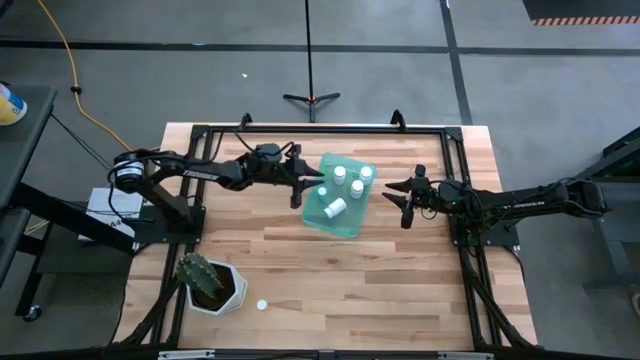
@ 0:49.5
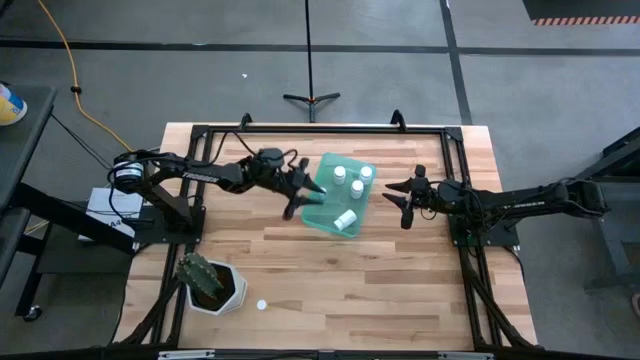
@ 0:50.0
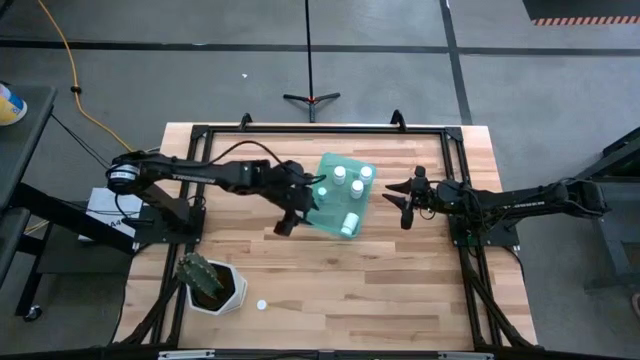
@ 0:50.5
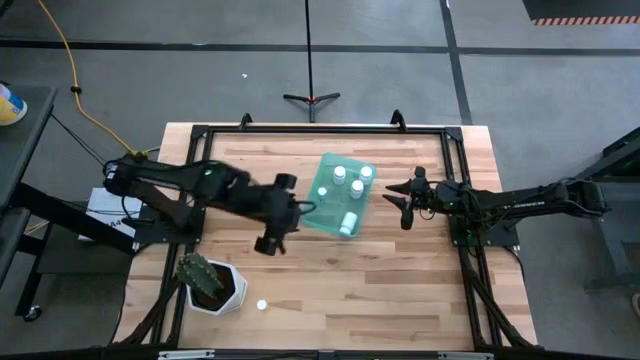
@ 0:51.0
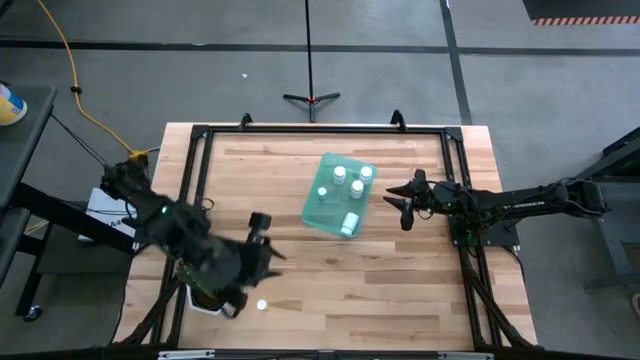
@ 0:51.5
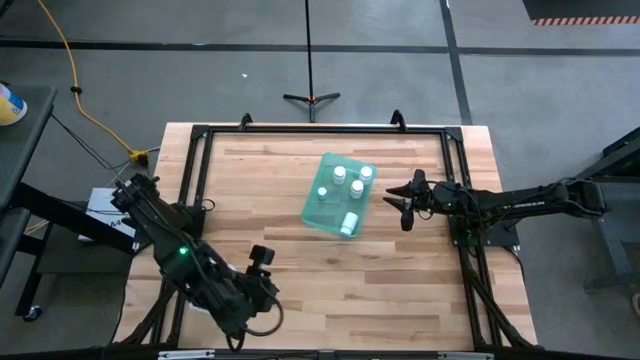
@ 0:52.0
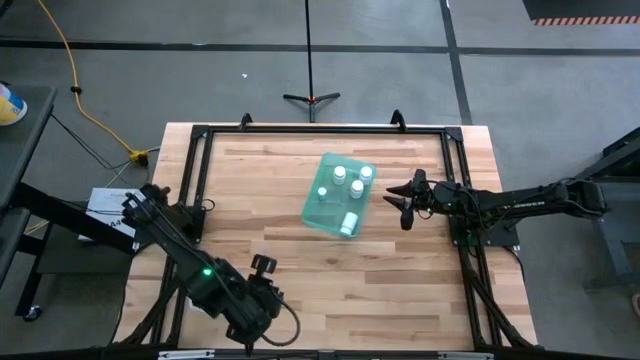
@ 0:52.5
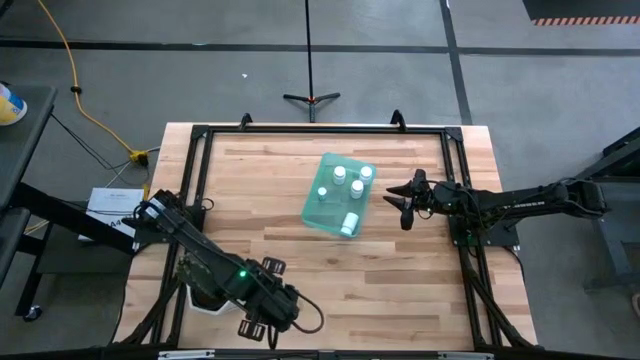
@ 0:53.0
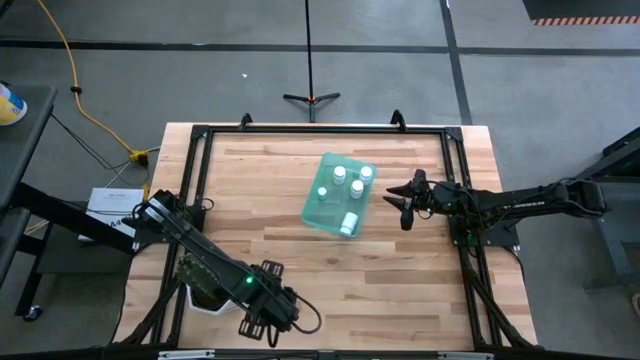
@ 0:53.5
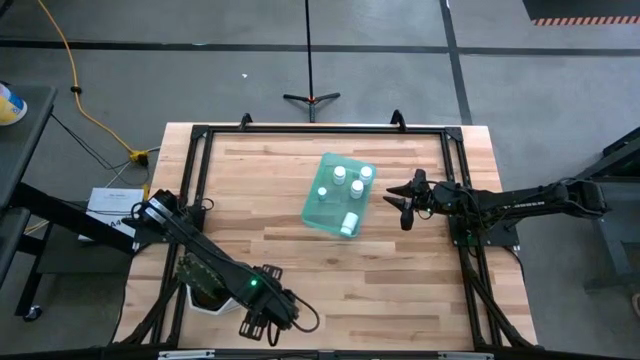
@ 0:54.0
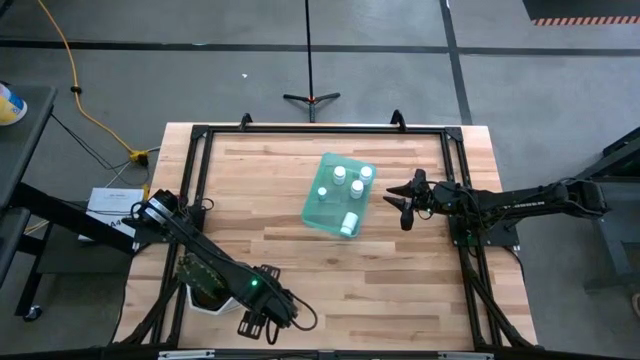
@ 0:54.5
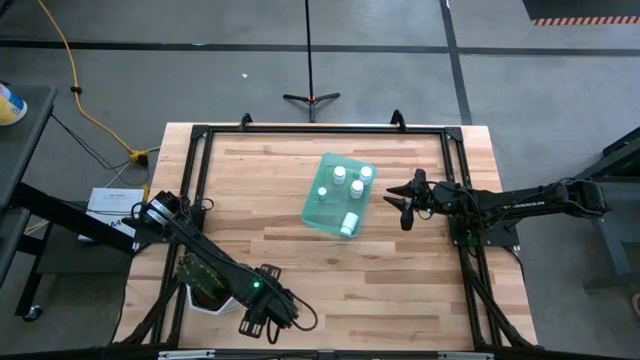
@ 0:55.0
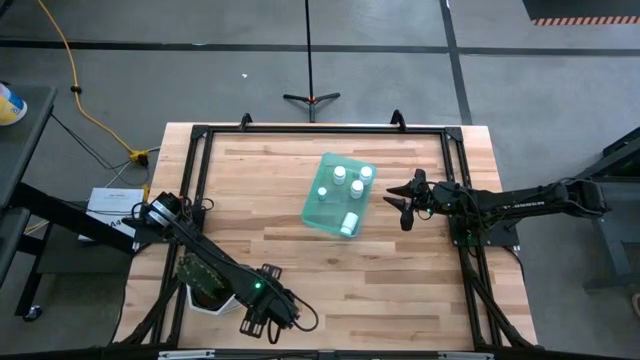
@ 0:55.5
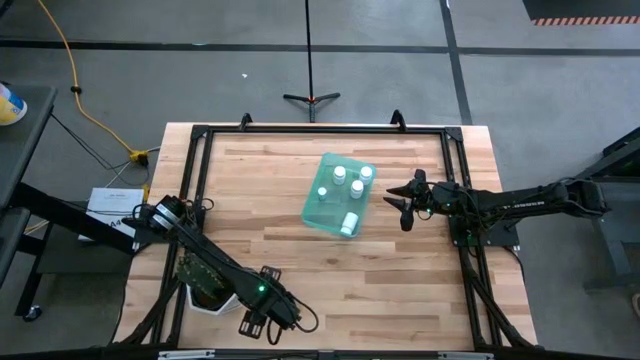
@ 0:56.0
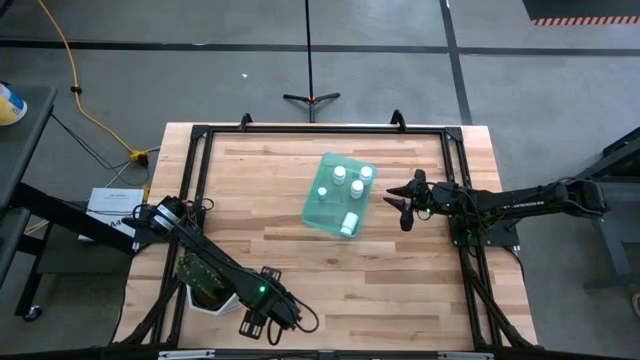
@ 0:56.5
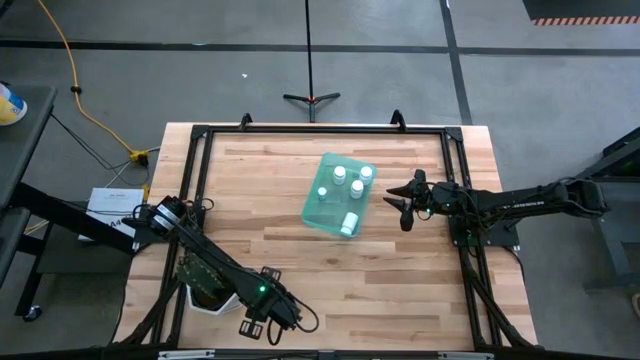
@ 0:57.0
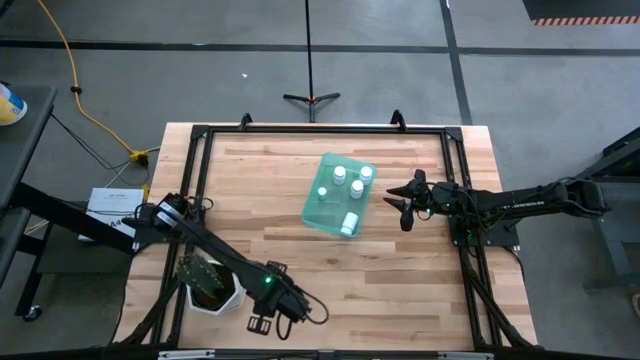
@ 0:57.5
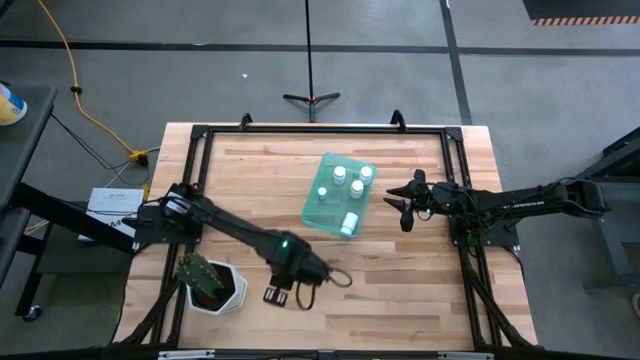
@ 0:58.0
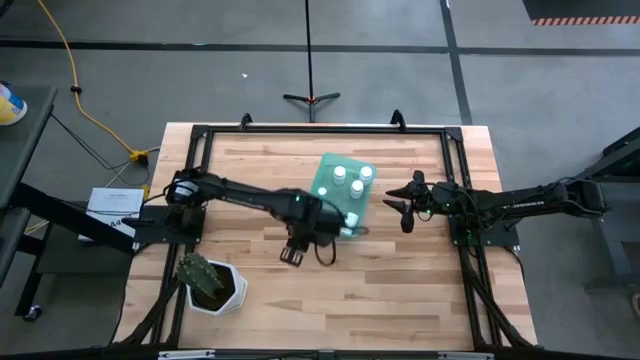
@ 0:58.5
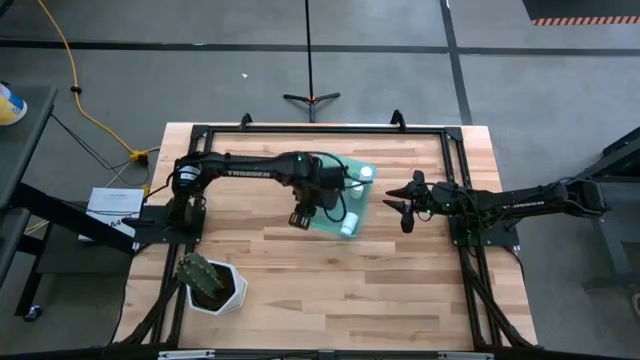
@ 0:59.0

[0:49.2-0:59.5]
Task: Pick and place pill bottles into a basket
Put the yellow pill bottle into the blue bin

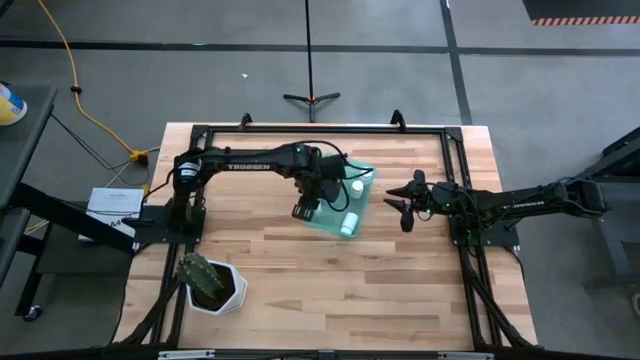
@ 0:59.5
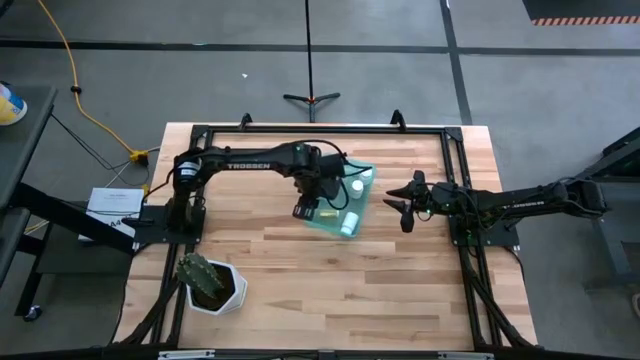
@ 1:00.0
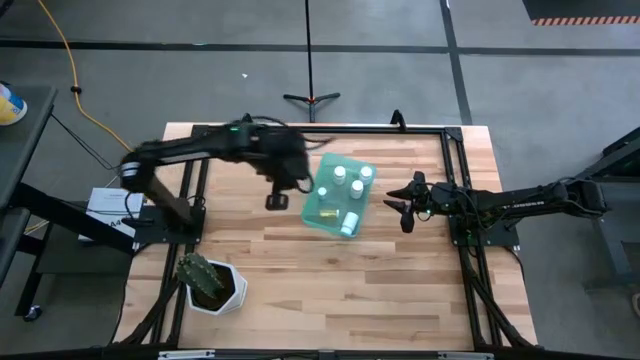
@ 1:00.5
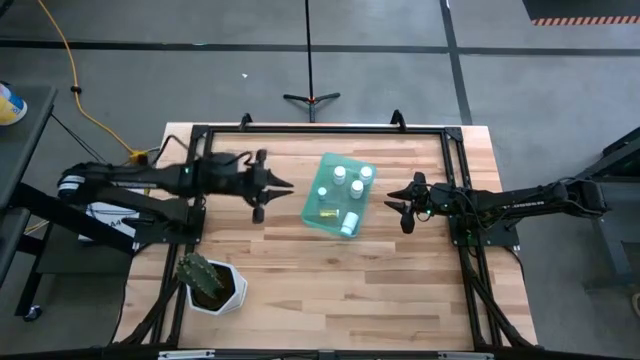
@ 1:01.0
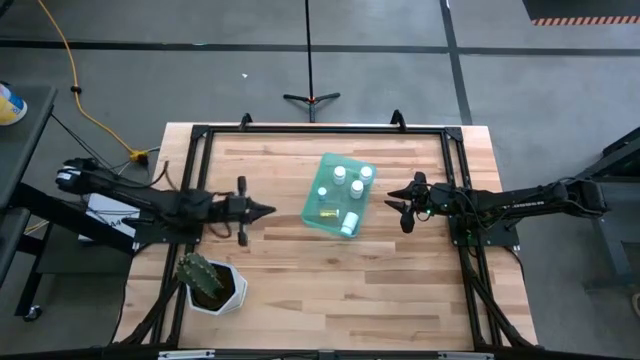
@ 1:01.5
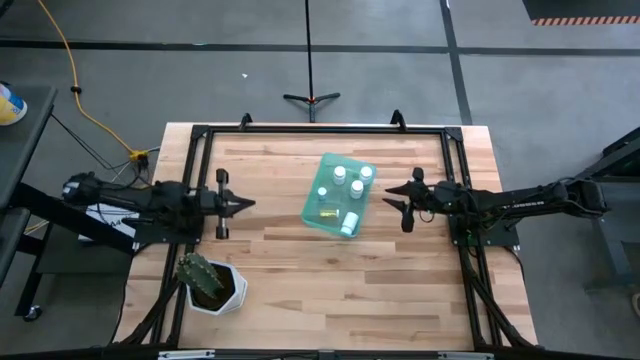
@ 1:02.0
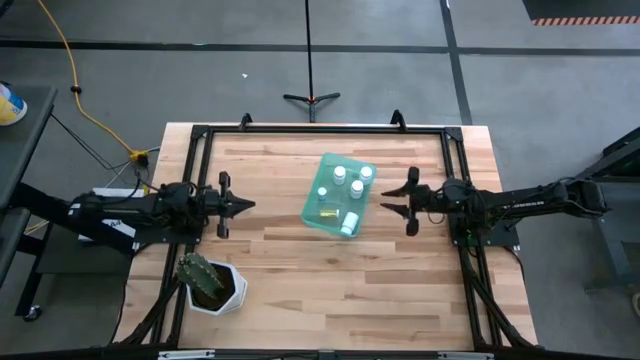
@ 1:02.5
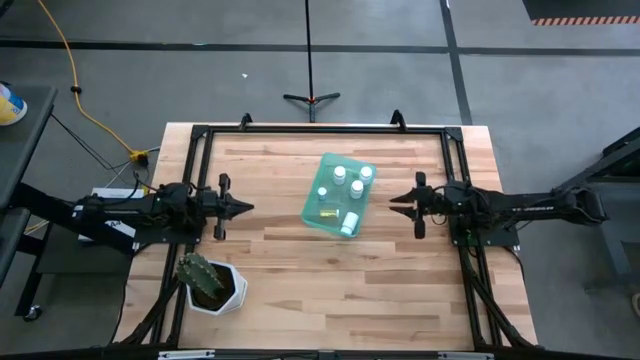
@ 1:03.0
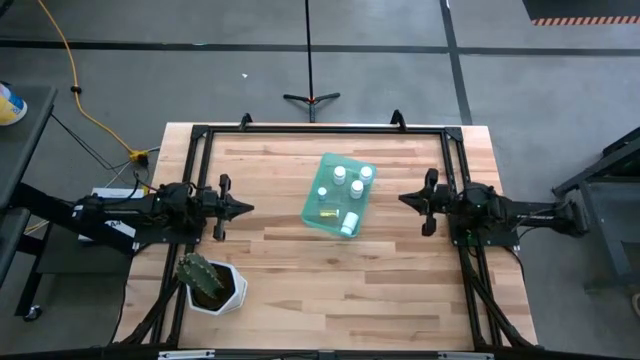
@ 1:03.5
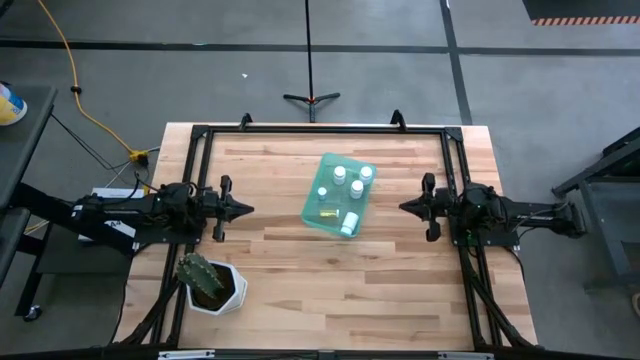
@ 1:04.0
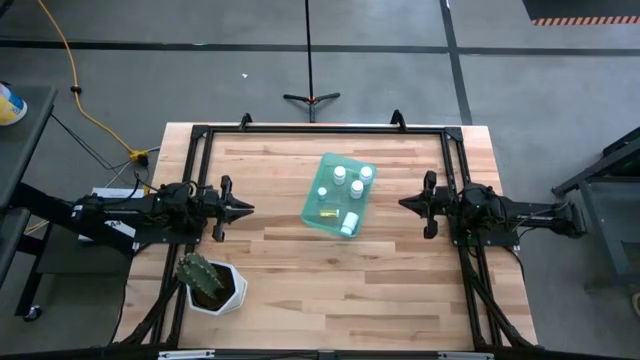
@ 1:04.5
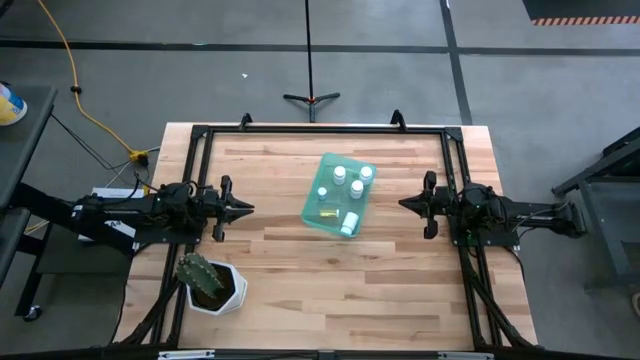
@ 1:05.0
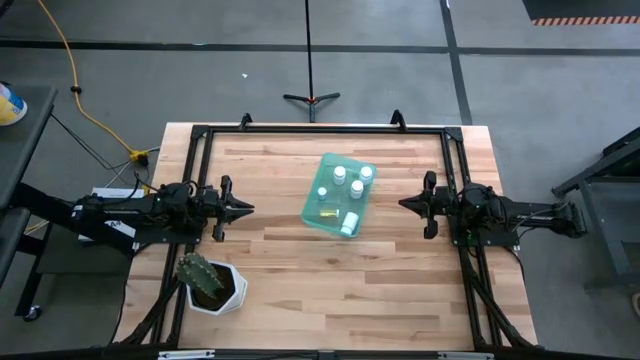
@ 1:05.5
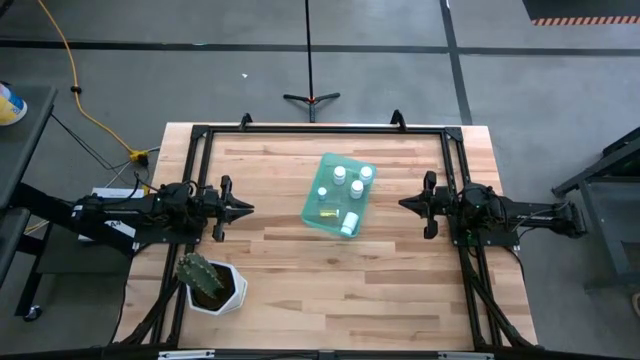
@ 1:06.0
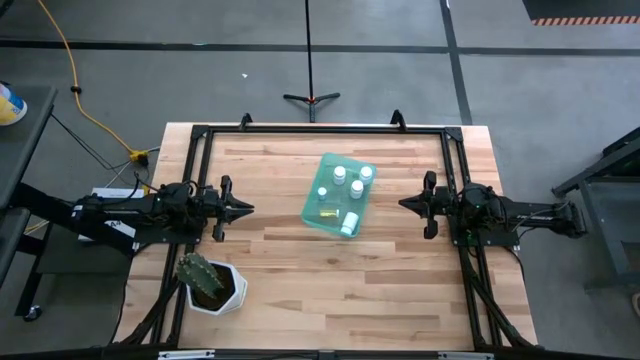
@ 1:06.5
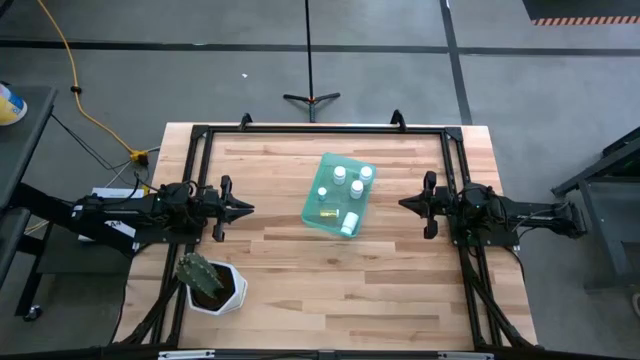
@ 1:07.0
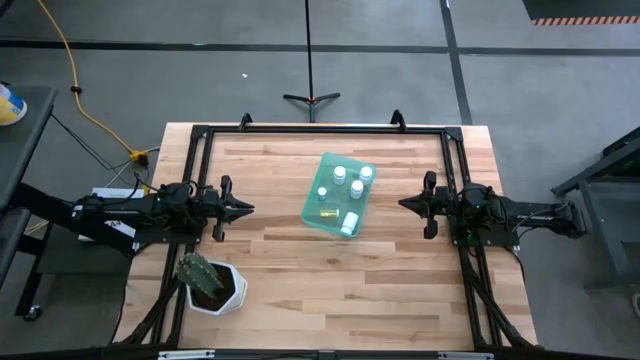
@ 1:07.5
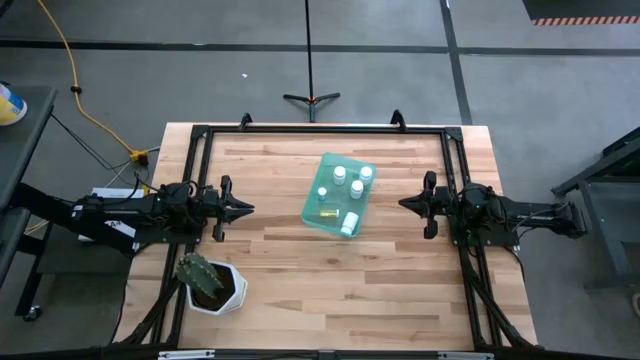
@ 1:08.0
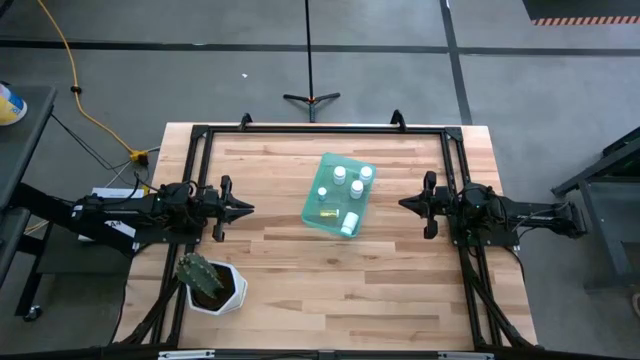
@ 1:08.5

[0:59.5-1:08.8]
Return to Home Position

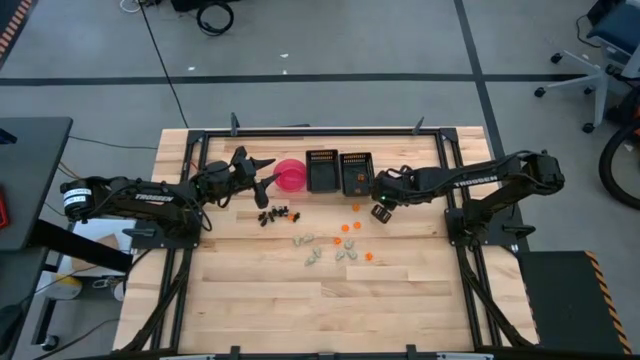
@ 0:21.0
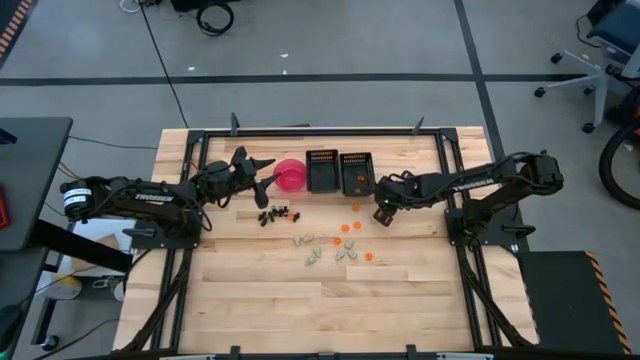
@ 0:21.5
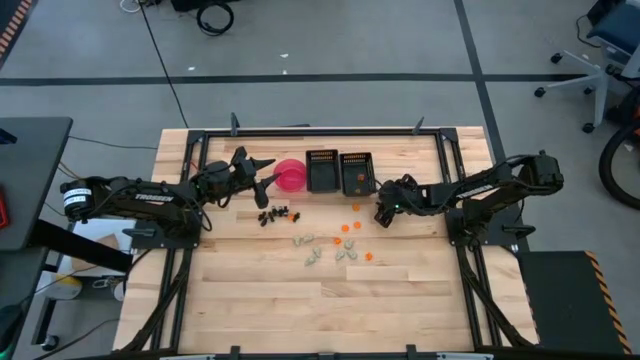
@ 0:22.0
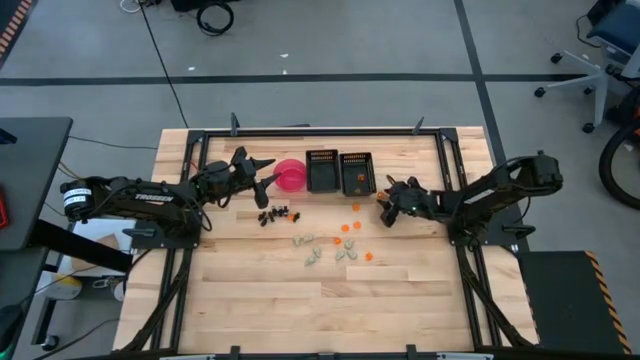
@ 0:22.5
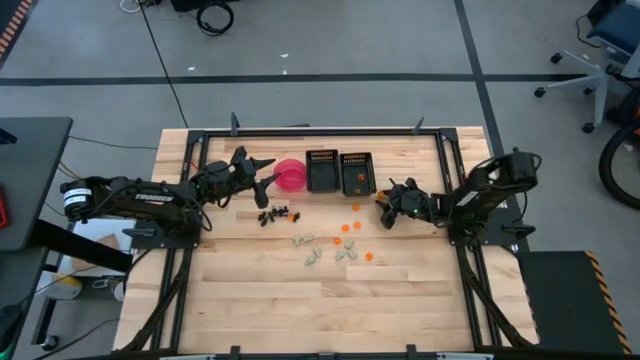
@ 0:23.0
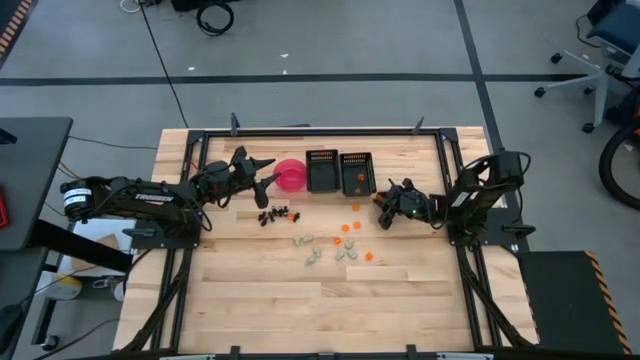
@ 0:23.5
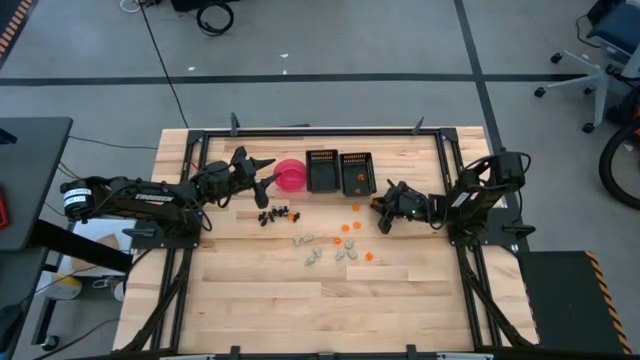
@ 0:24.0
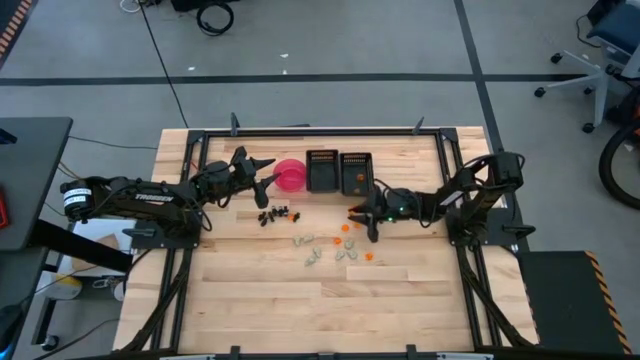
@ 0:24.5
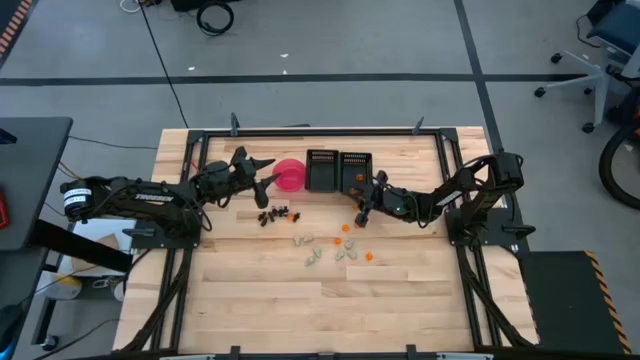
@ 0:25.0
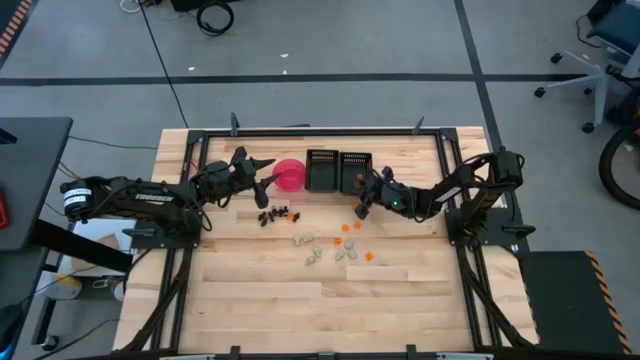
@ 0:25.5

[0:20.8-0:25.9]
Task: Sort Halloween decoration
Put the orange pumpkin toy into the right black bin
